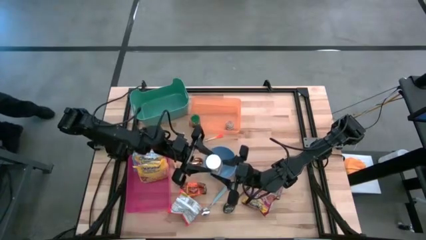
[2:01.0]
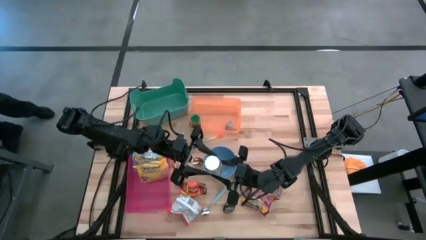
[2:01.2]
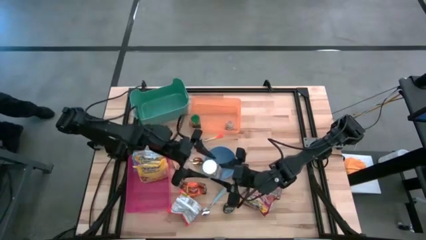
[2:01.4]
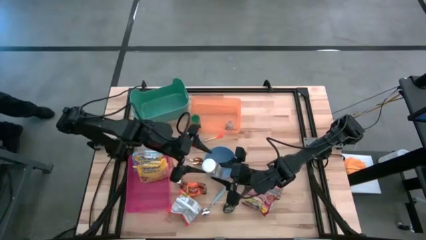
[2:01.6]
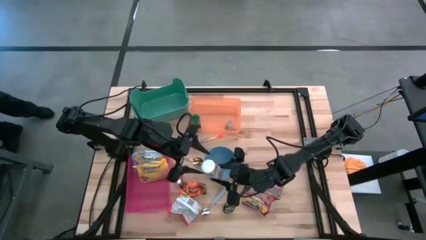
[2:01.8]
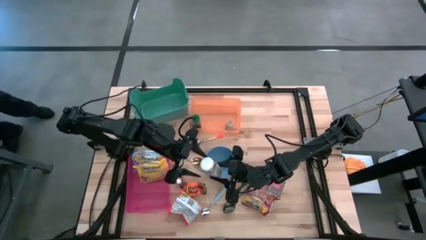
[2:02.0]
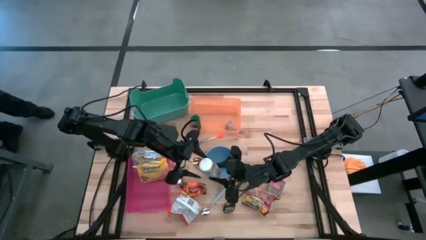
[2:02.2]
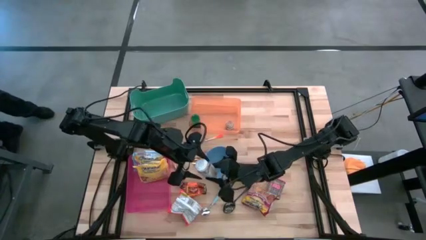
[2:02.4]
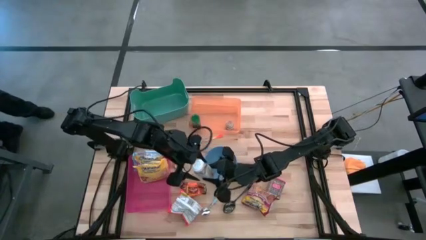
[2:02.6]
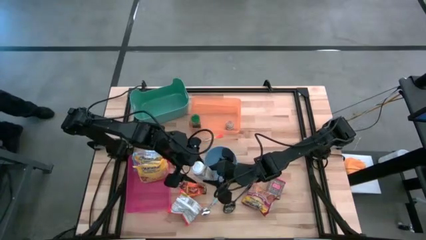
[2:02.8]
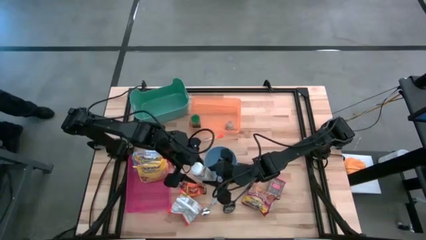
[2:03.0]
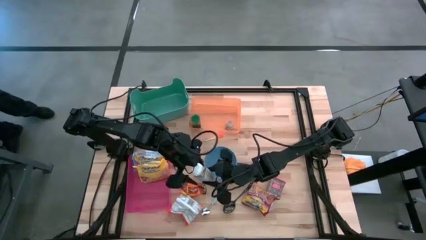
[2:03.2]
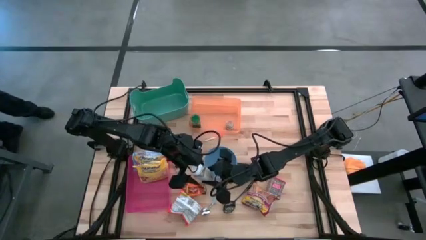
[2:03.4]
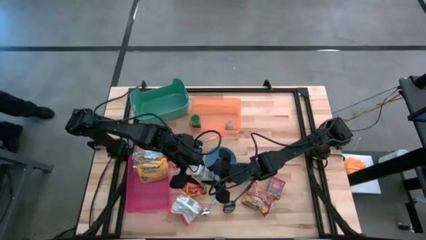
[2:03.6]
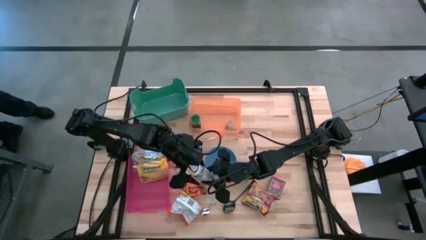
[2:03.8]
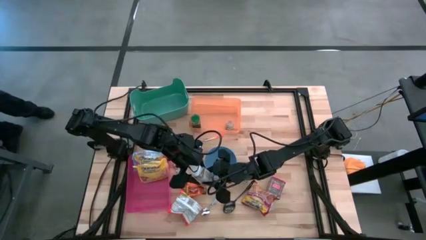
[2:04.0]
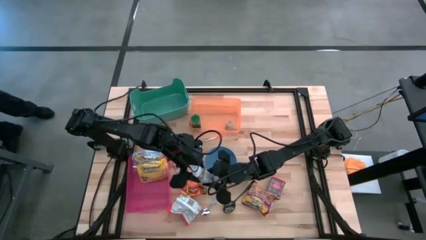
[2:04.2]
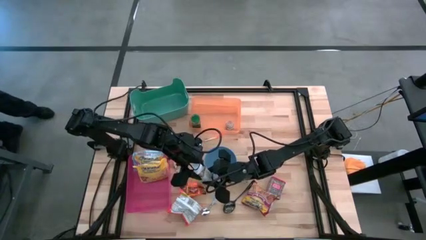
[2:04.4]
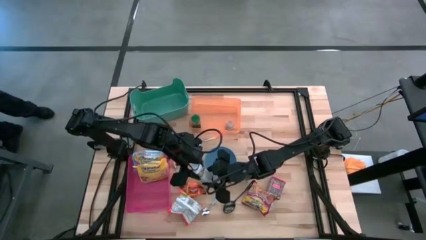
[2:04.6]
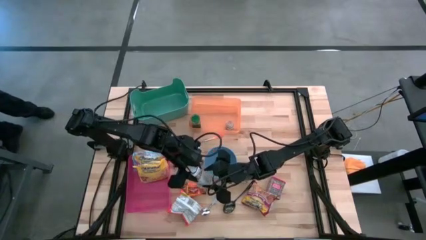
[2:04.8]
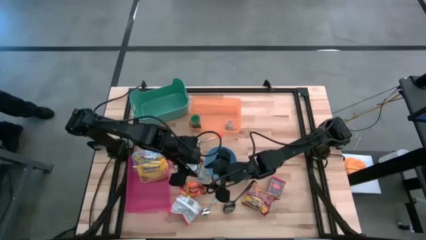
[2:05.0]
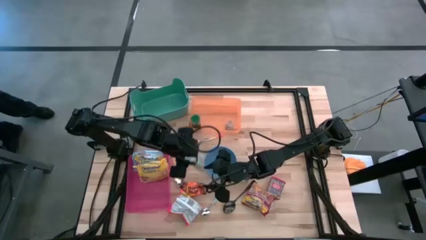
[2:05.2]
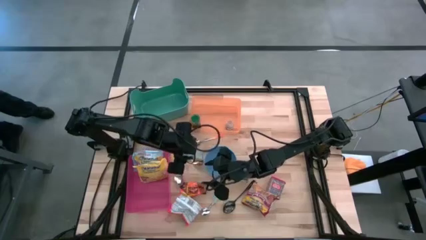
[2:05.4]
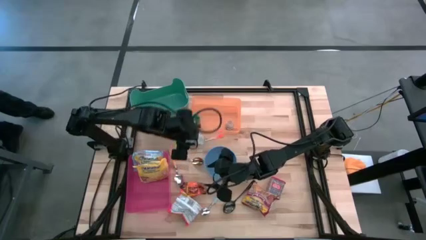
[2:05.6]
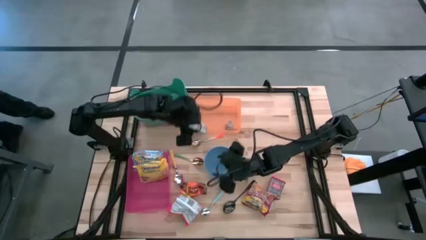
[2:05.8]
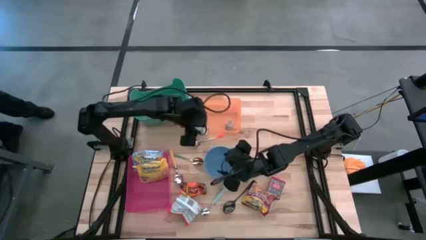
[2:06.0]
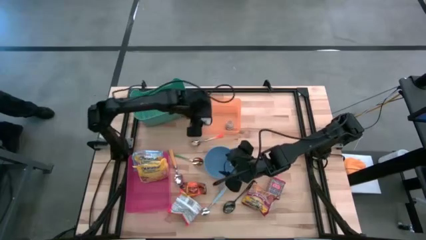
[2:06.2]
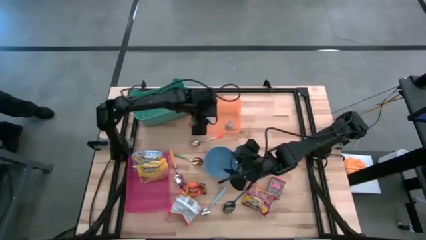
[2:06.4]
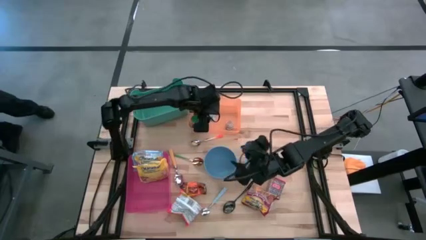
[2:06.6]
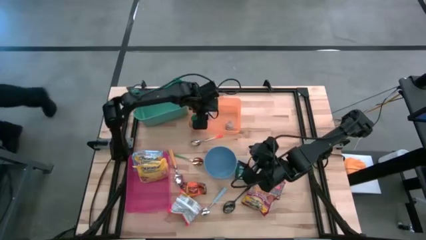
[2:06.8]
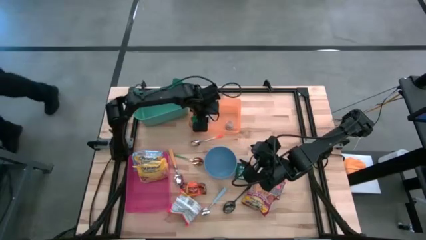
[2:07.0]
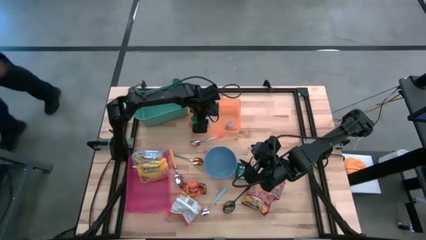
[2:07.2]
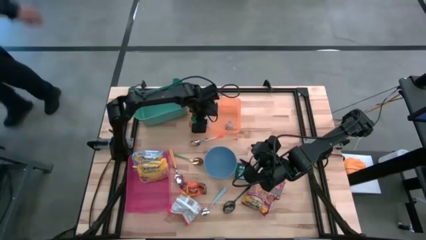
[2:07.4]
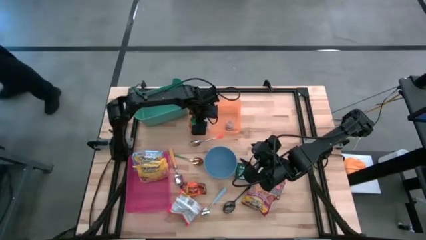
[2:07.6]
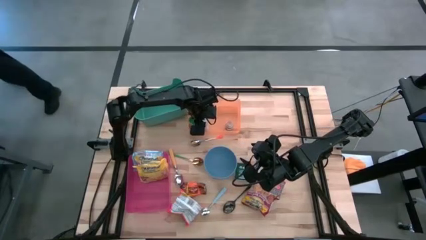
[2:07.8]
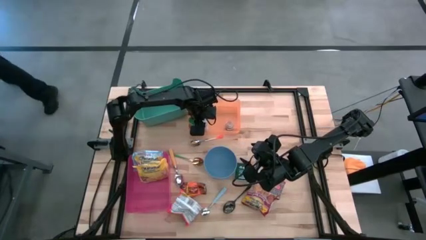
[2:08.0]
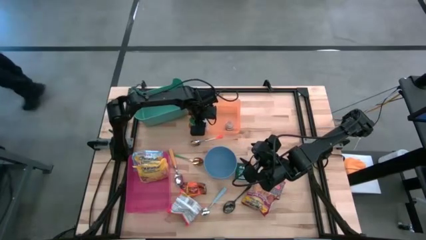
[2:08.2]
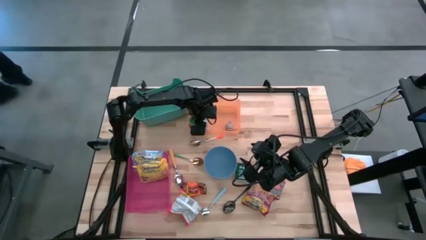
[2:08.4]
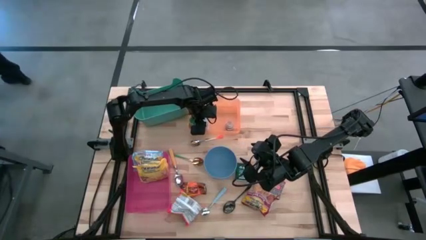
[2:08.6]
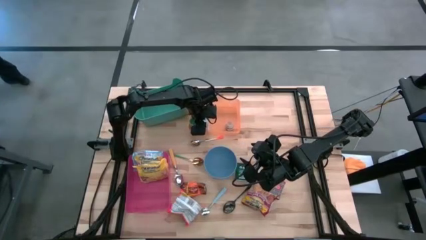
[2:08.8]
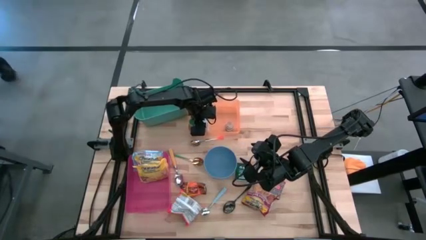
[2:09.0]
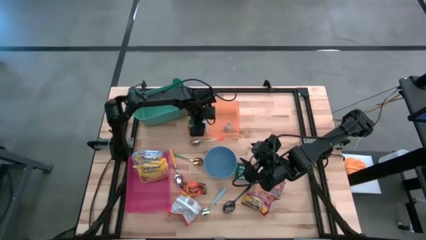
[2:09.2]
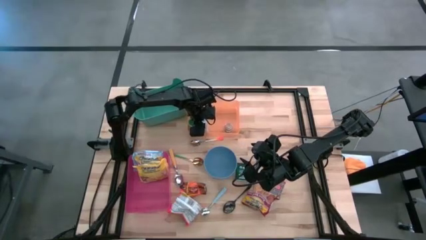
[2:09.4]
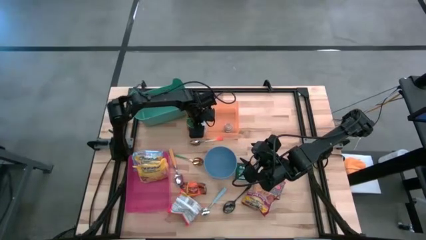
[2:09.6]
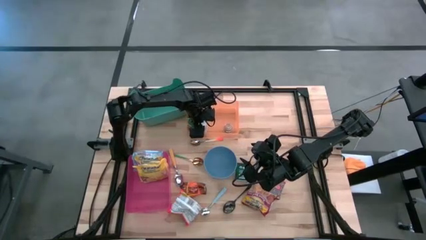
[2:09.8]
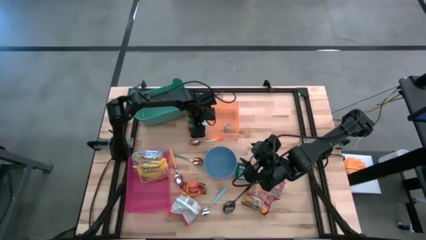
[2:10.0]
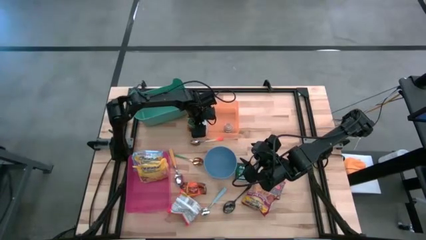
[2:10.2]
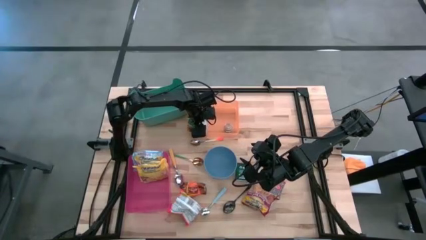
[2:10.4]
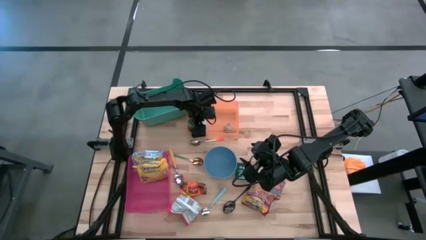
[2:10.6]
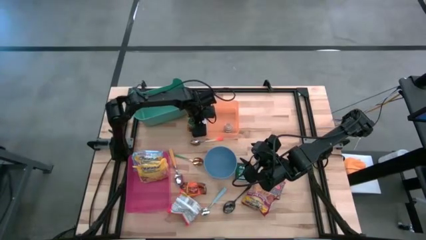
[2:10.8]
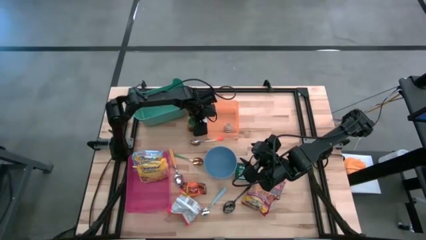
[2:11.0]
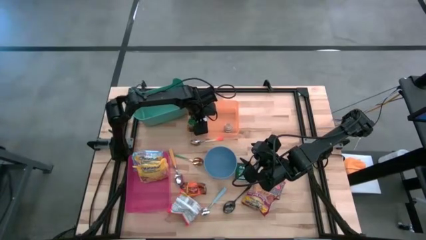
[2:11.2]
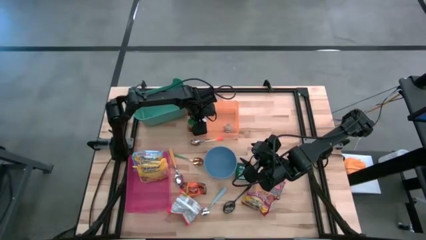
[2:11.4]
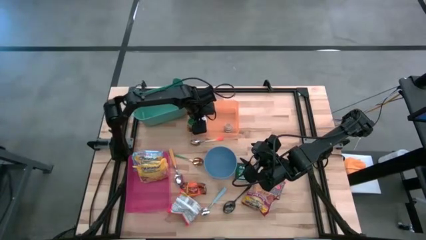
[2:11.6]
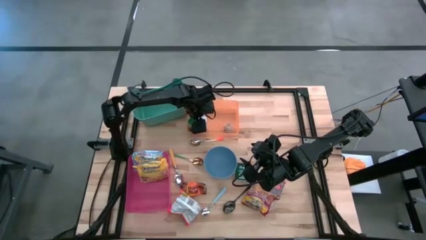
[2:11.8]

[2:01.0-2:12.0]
Put the white spice bottle into the orange bin
